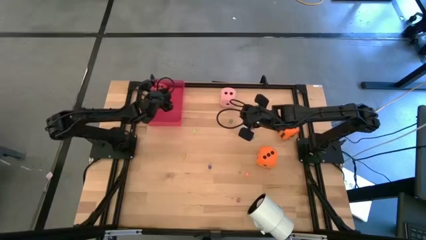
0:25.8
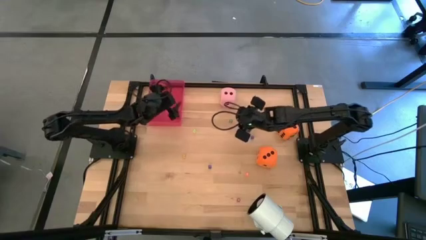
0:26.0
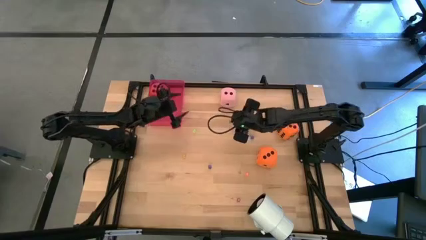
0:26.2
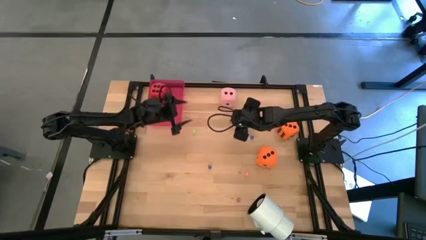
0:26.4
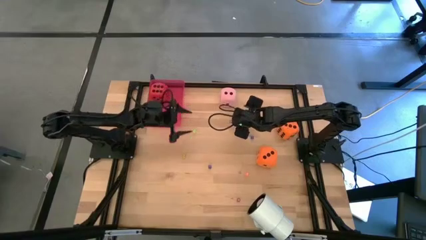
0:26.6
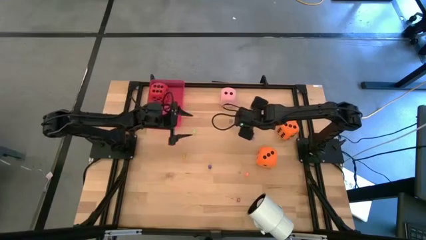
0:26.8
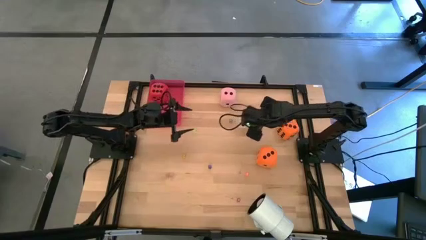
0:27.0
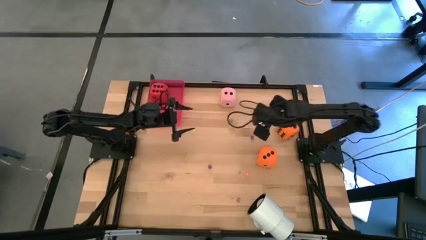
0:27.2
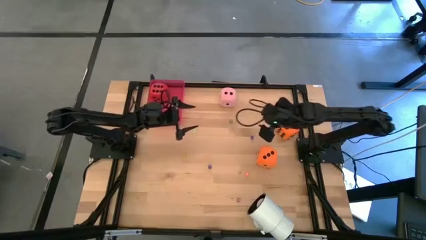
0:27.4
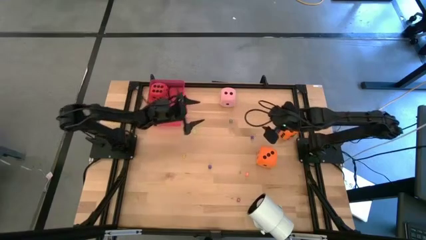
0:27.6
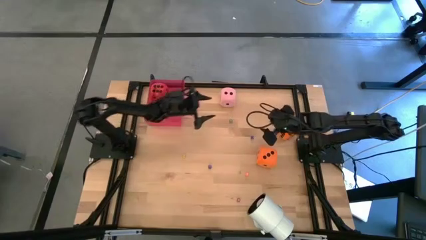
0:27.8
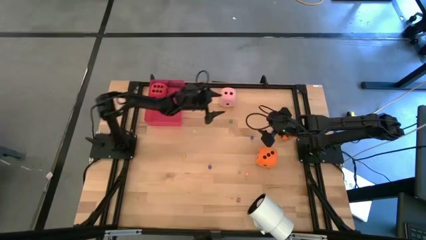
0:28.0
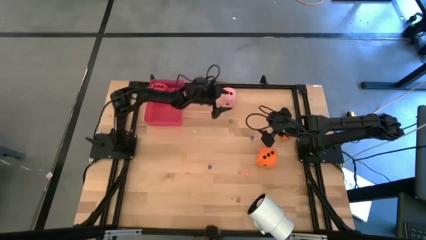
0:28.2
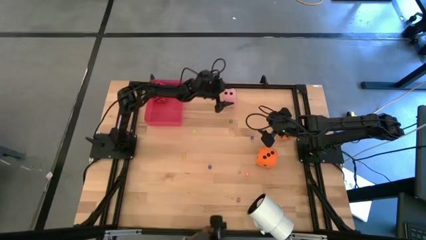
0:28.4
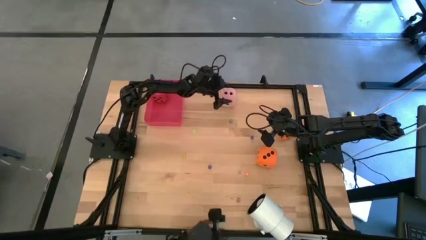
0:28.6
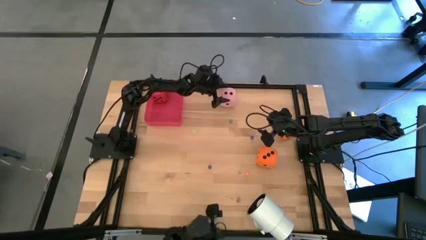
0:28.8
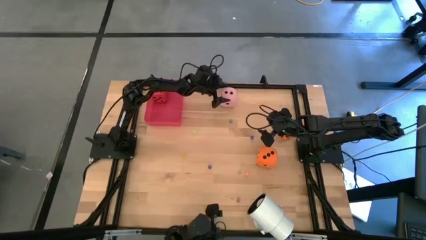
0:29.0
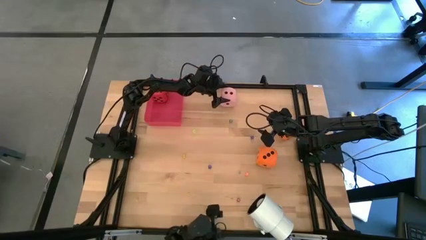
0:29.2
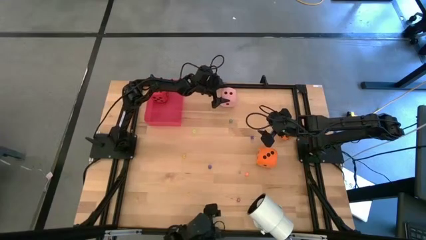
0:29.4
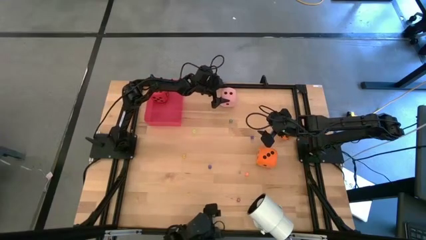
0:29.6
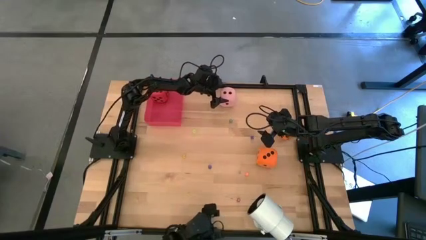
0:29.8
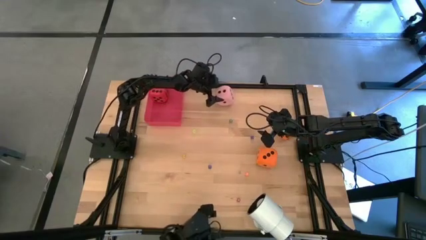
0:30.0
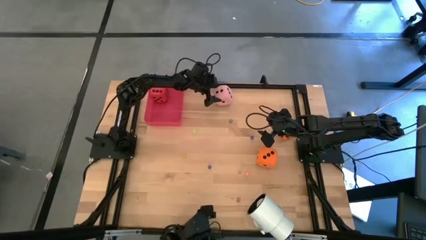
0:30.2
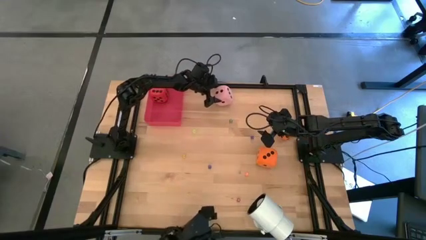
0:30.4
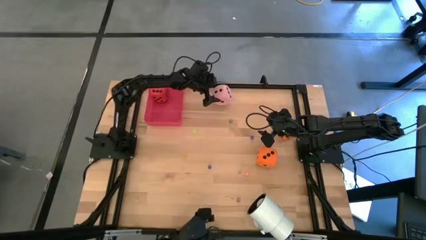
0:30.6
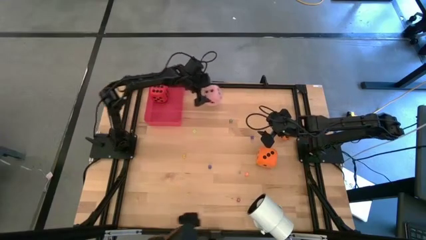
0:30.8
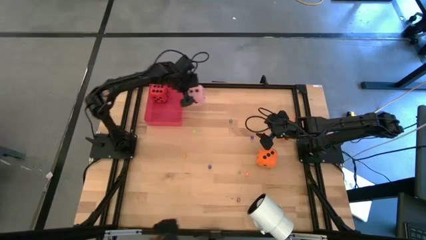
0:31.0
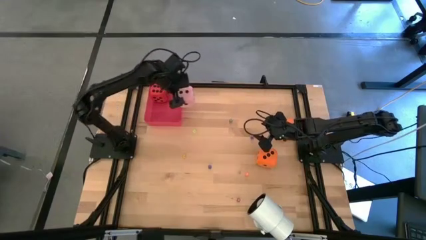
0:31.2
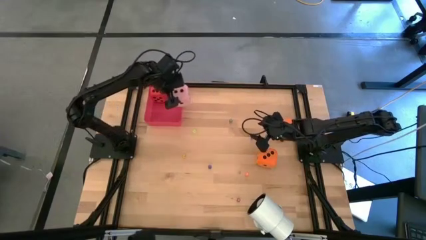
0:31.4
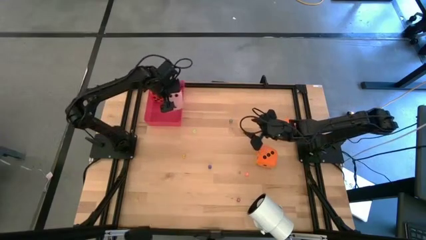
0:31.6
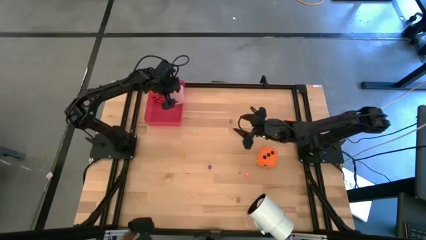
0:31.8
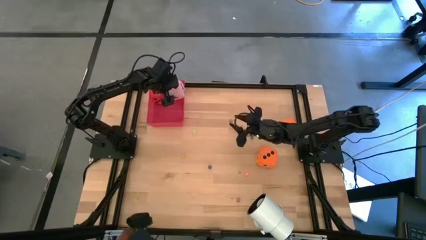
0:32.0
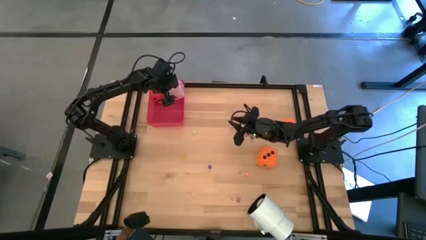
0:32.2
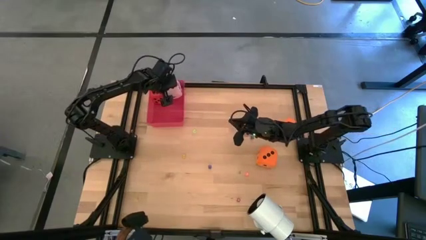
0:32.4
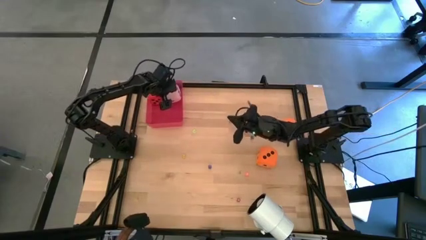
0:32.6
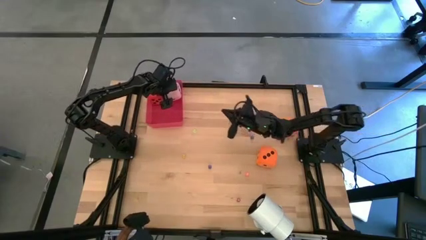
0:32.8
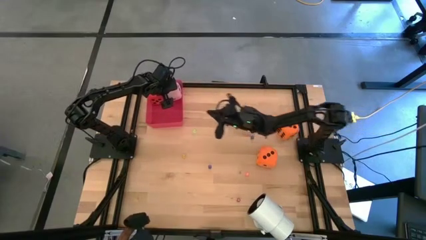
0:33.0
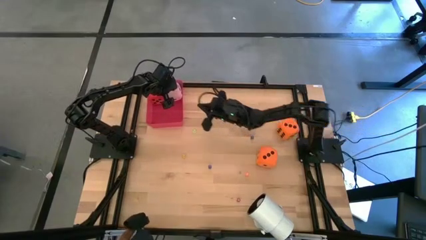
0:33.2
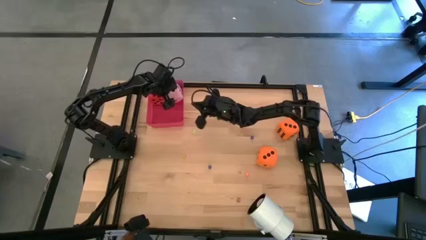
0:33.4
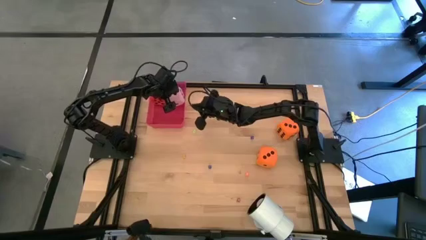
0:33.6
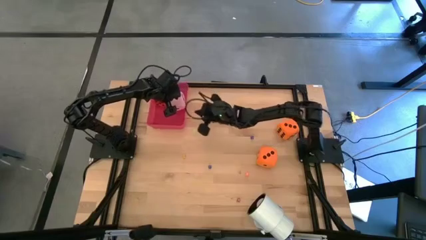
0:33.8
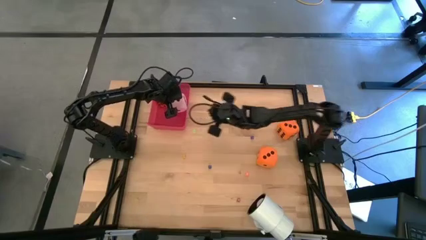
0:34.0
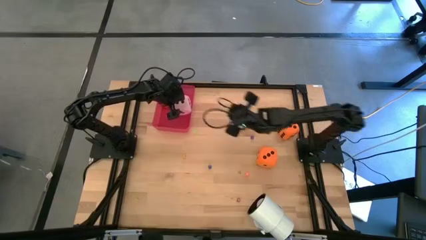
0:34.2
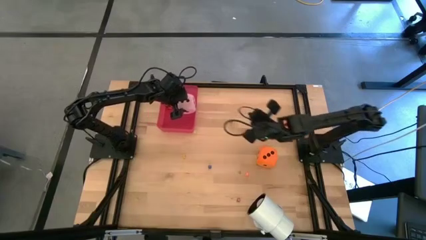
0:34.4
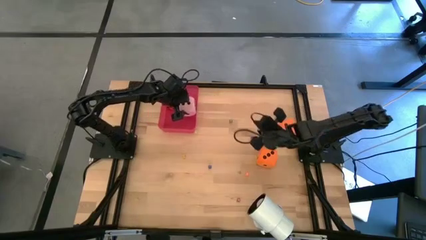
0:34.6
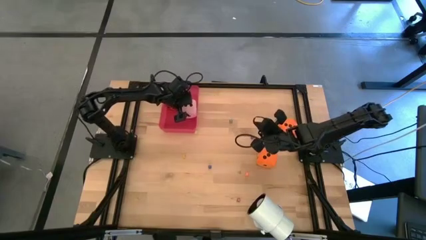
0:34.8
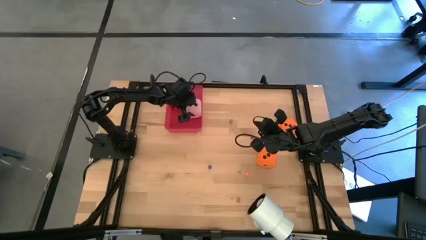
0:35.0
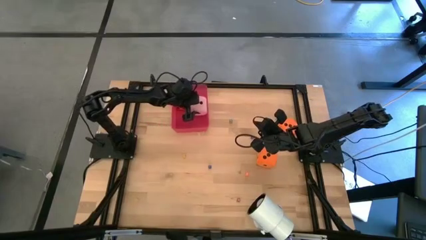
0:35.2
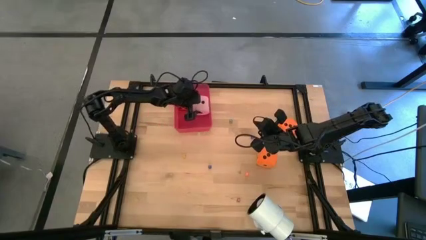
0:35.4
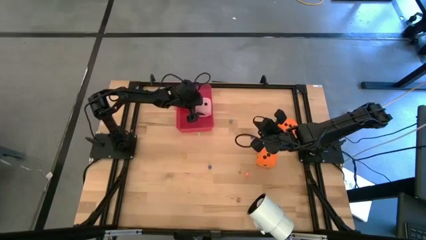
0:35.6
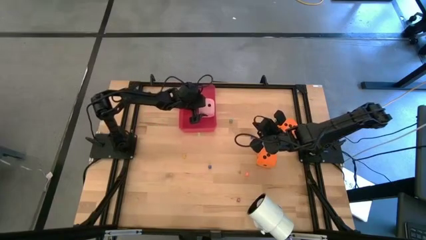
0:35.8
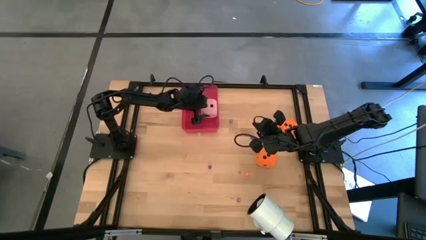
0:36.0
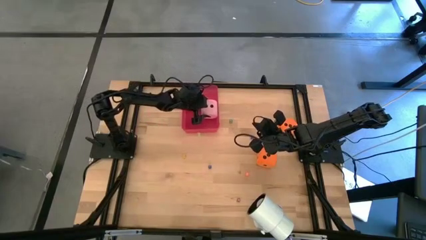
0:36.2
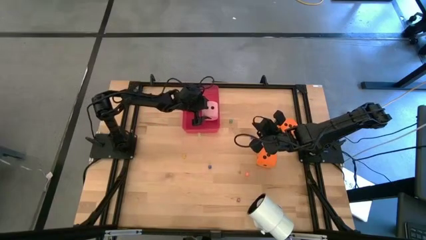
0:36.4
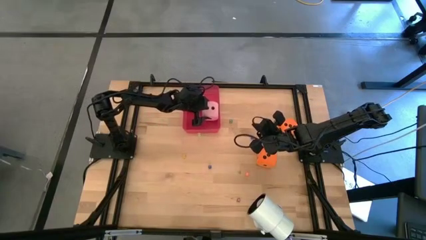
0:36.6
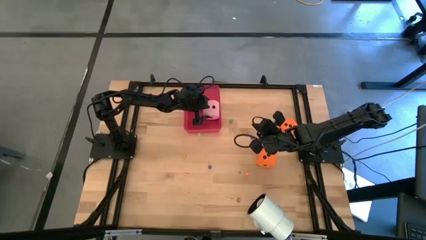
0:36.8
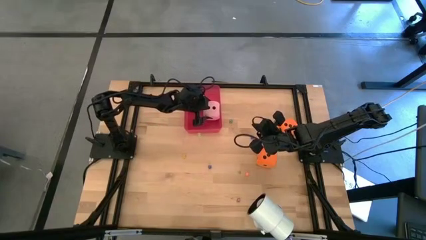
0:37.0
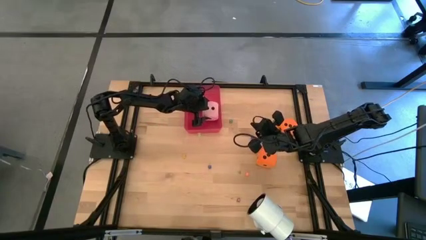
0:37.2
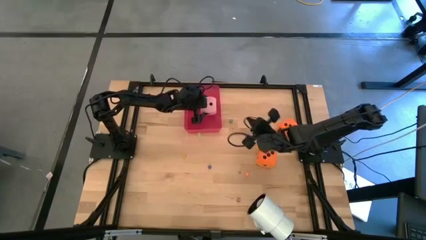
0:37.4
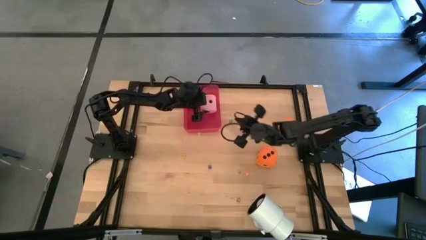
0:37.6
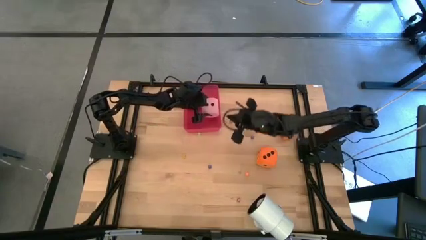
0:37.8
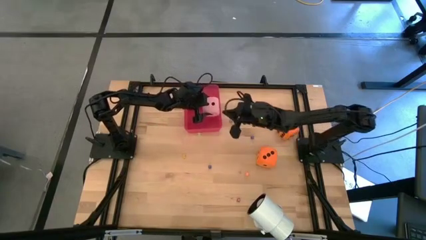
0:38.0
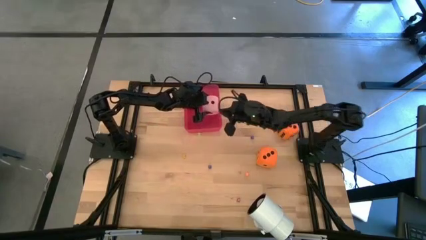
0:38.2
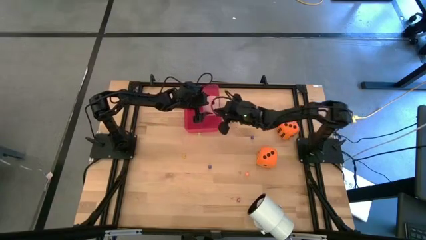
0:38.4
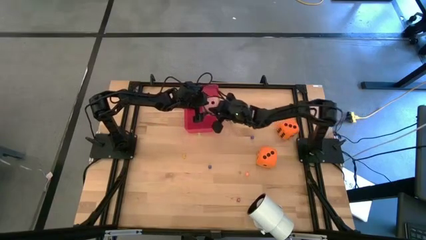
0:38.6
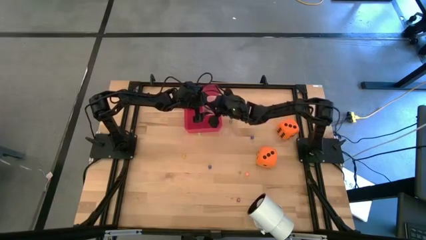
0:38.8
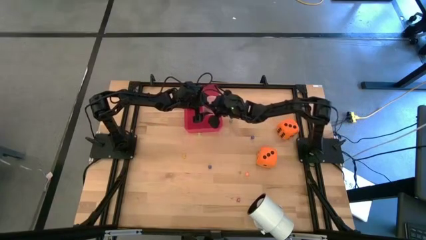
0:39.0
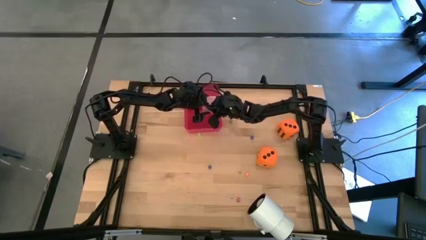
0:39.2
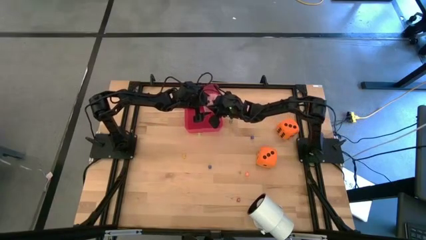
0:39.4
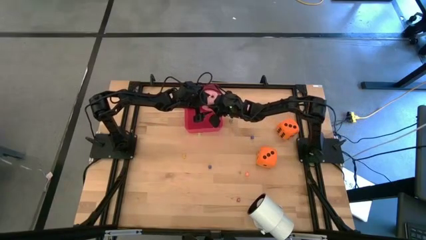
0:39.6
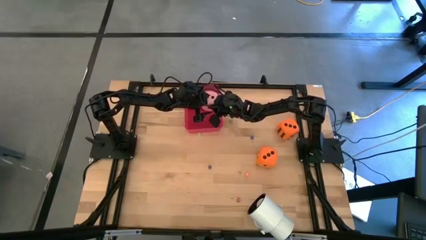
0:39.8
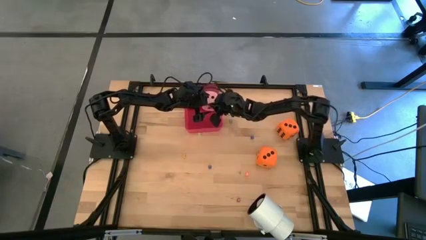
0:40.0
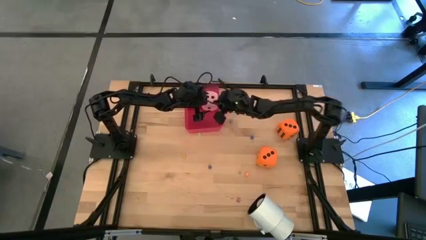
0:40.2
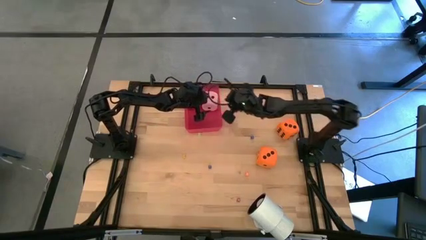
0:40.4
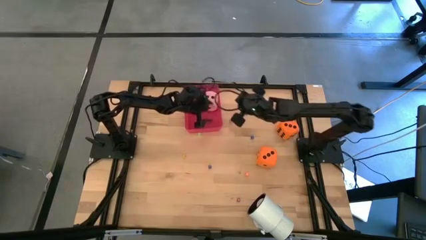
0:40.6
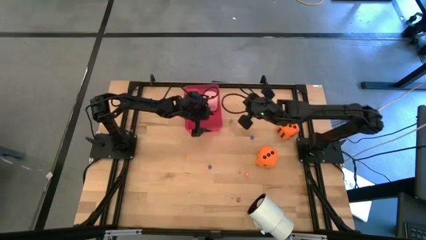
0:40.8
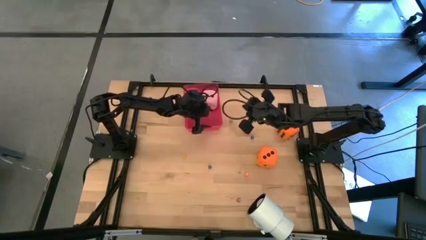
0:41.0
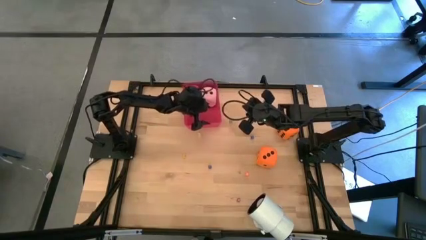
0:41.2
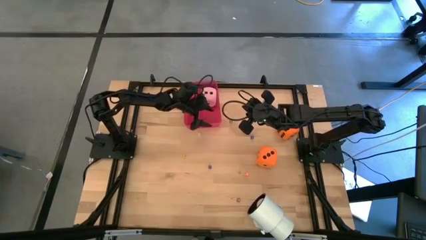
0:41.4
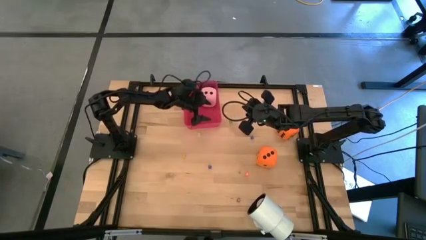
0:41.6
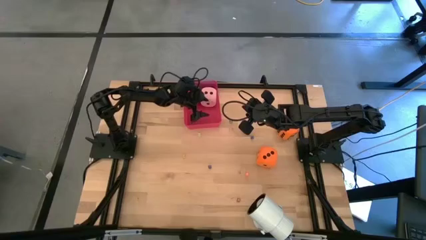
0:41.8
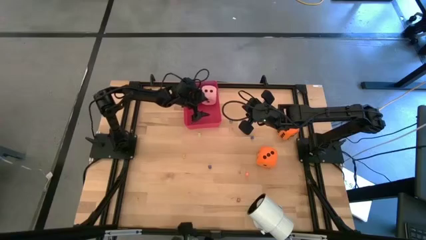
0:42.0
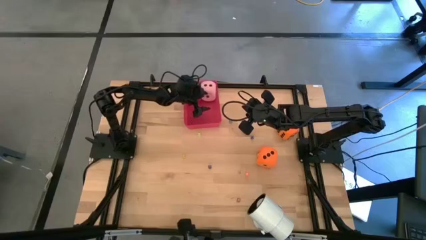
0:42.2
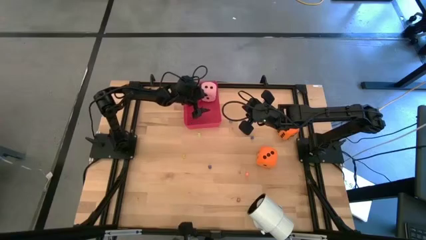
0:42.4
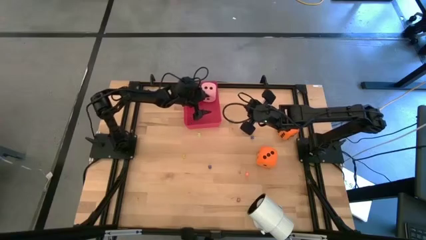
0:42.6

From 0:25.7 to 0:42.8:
Task: Pick & Place Dice
Put the big light pink dice into the red bin
